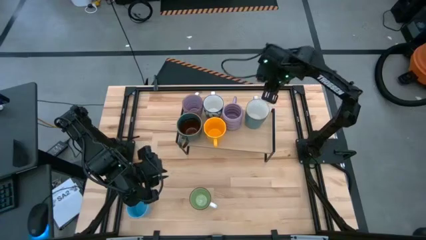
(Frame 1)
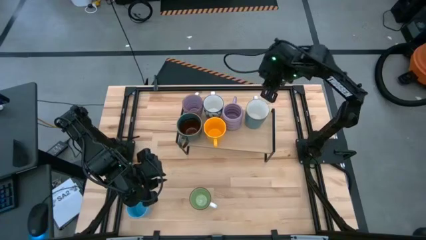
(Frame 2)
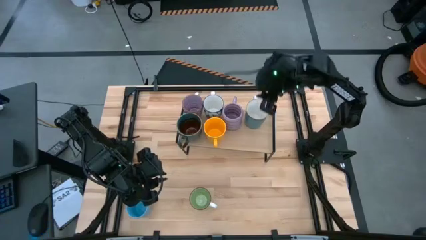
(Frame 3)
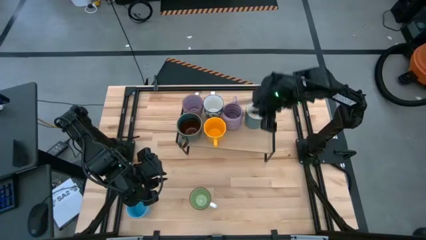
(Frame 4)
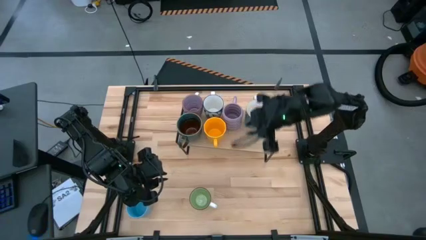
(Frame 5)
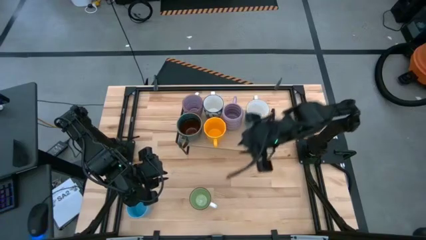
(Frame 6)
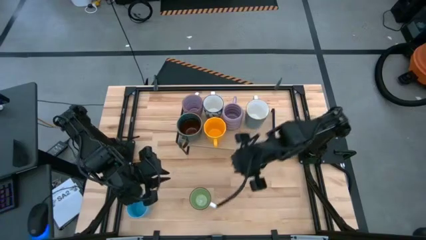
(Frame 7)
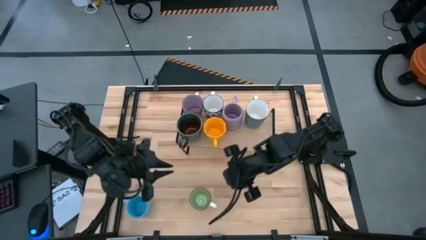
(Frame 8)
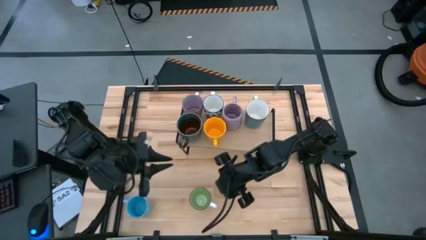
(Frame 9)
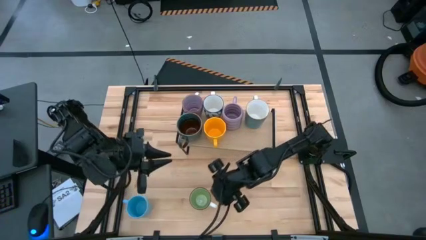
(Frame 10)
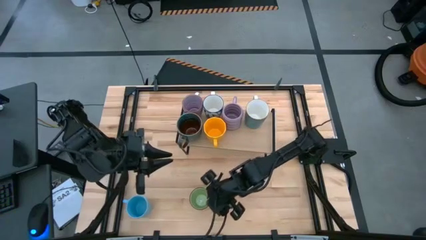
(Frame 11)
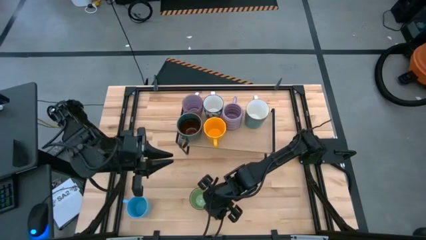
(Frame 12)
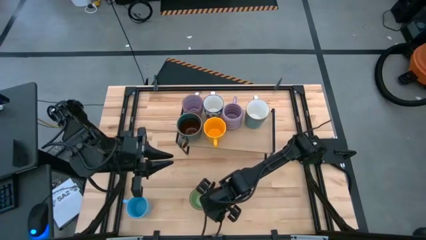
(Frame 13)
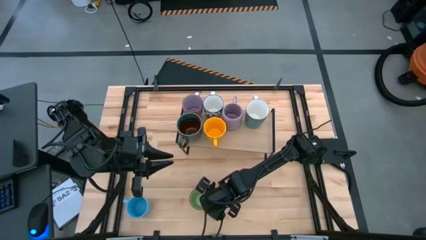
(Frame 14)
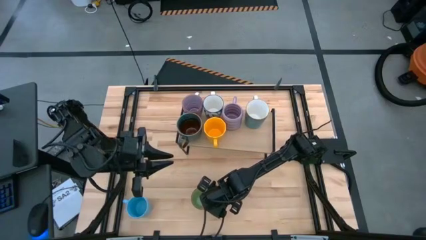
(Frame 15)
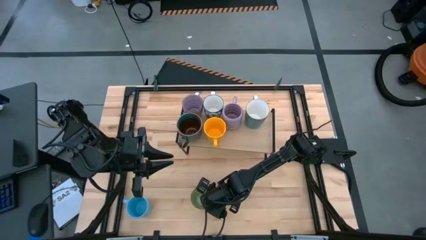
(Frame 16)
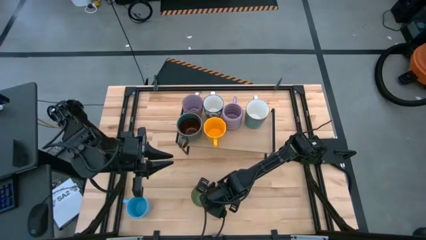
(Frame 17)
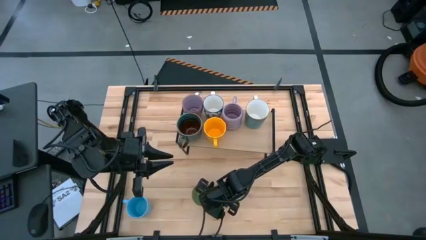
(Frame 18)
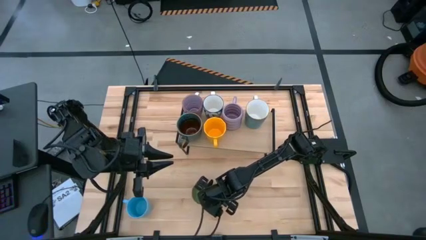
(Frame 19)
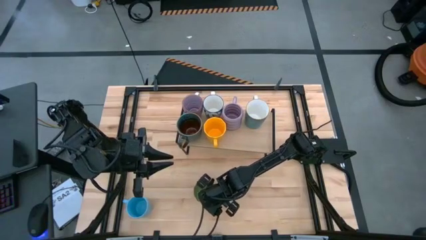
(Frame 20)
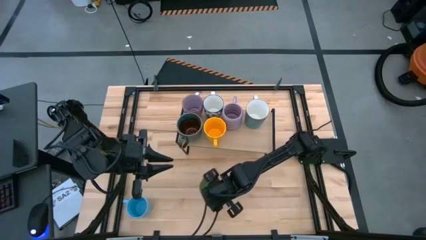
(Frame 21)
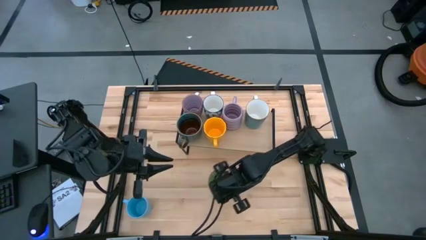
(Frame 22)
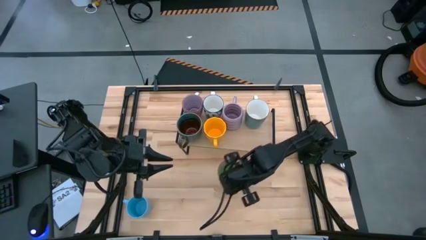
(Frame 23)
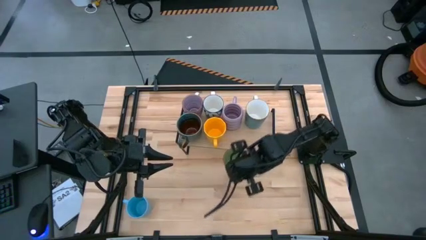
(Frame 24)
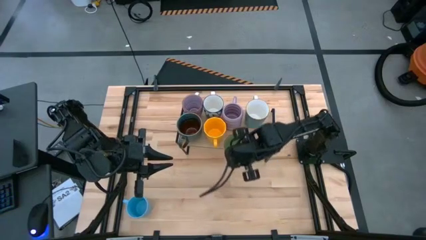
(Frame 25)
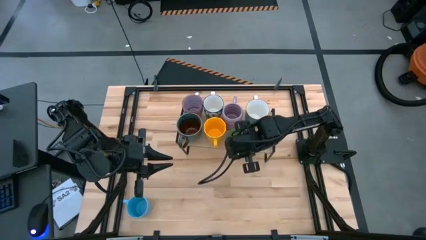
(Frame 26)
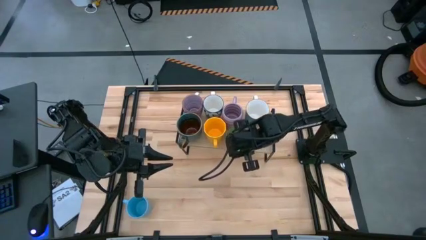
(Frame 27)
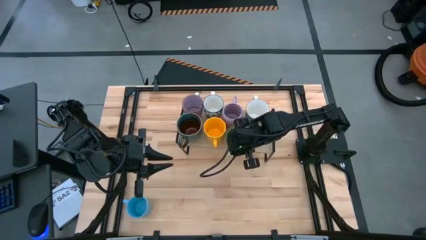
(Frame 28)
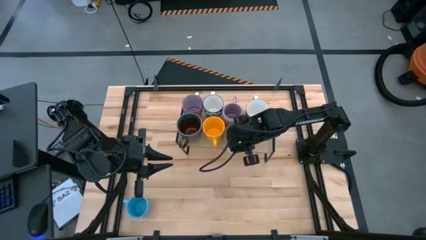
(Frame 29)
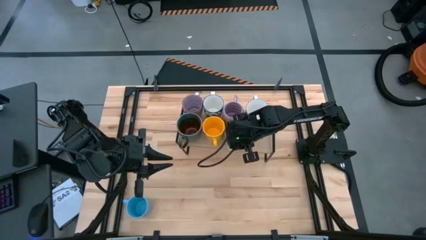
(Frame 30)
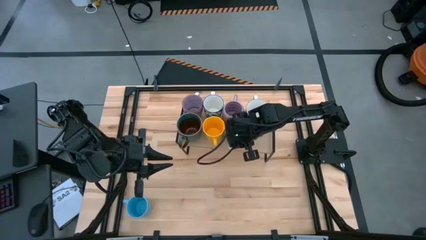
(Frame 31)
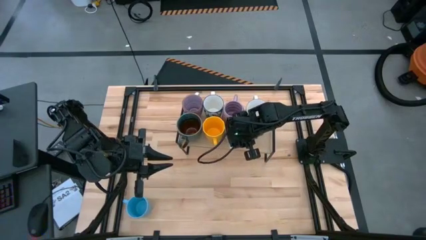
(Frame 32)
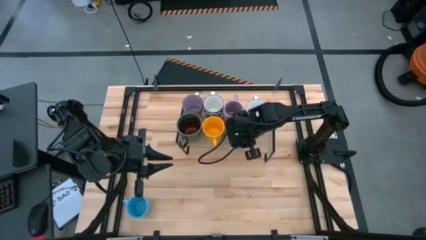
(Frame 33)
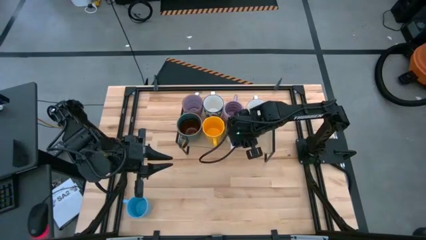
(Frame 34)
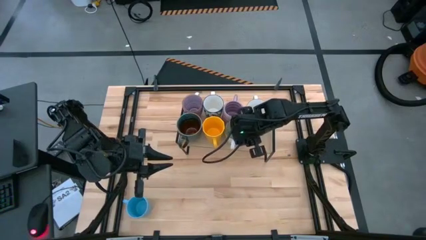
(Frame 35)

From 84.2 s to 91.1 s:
Task: Place coffee mugs
Put the green mug on the shelf

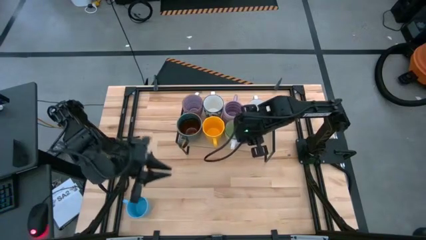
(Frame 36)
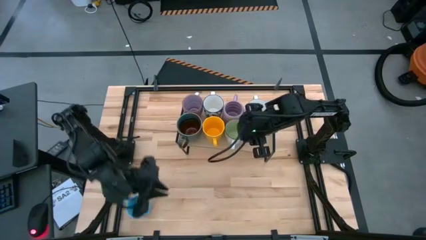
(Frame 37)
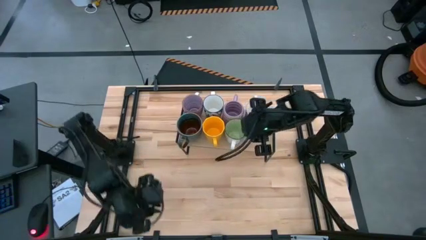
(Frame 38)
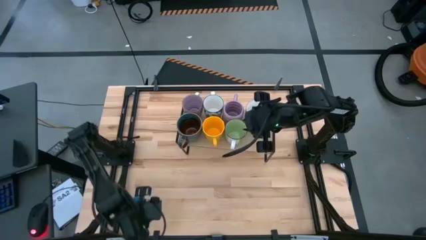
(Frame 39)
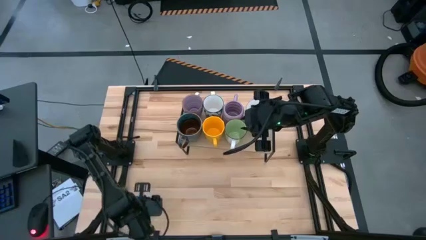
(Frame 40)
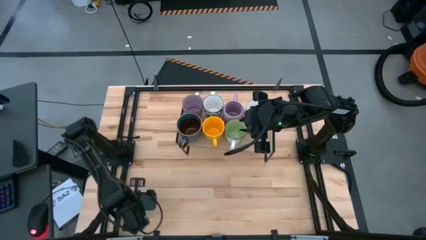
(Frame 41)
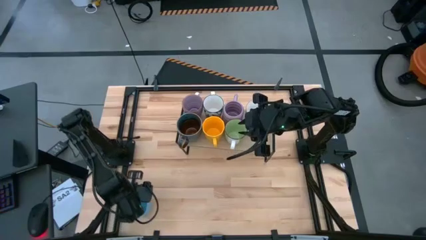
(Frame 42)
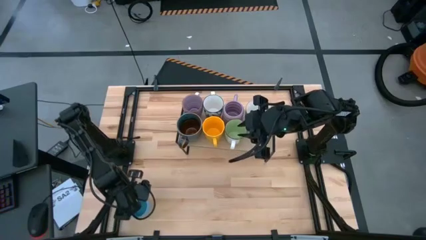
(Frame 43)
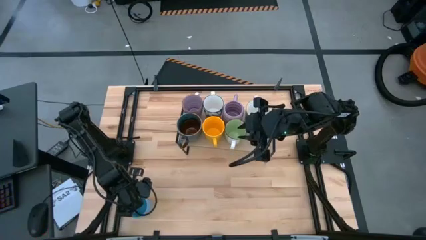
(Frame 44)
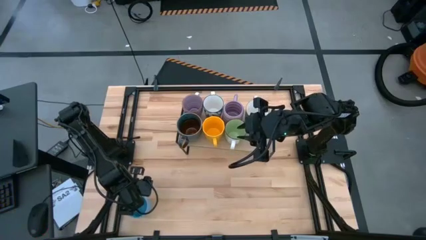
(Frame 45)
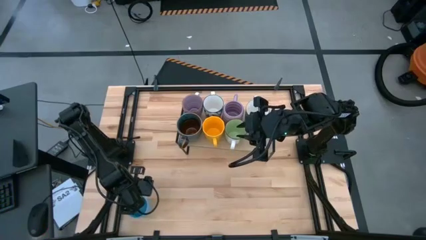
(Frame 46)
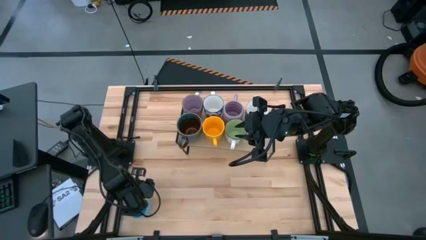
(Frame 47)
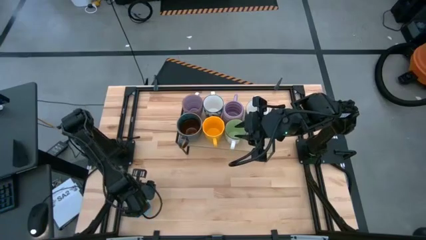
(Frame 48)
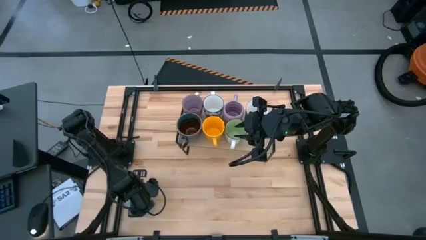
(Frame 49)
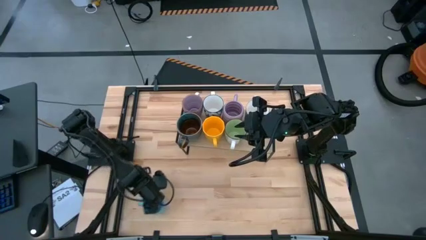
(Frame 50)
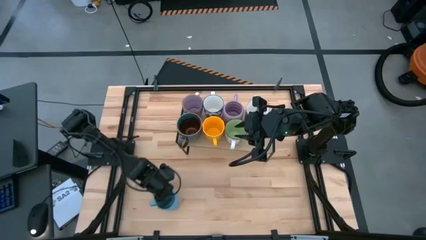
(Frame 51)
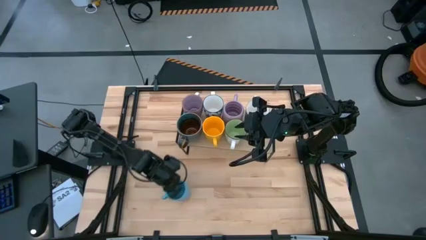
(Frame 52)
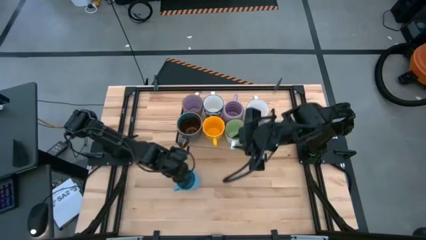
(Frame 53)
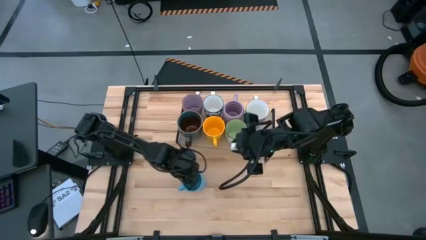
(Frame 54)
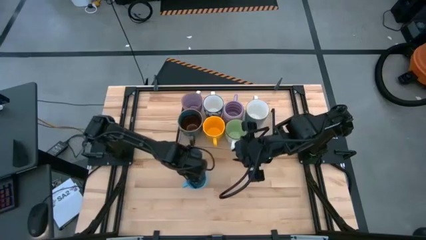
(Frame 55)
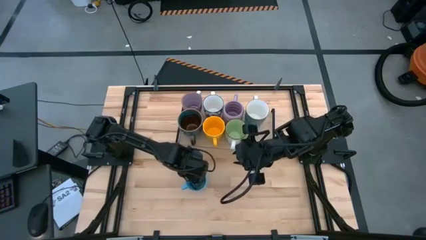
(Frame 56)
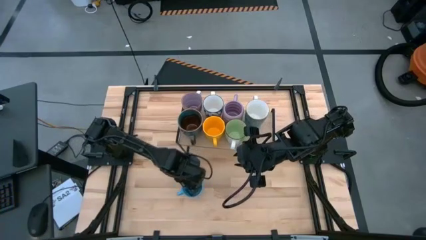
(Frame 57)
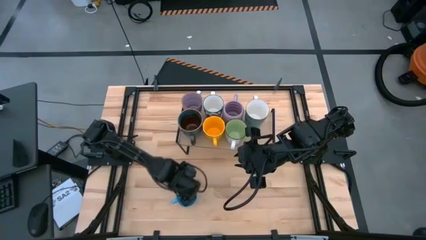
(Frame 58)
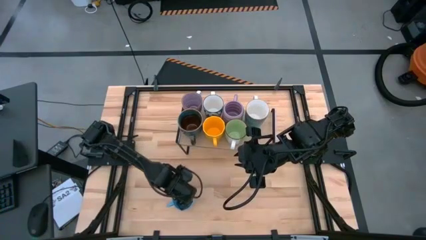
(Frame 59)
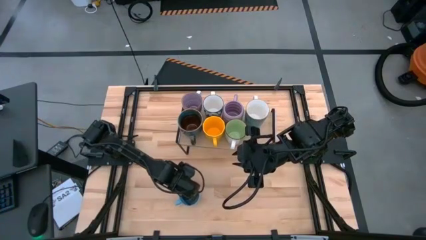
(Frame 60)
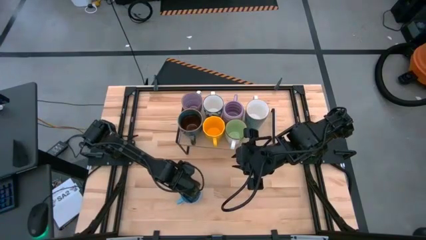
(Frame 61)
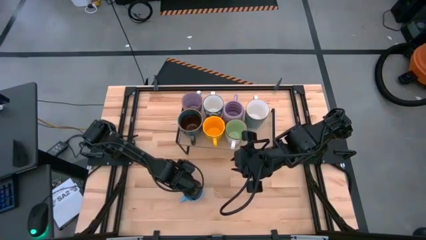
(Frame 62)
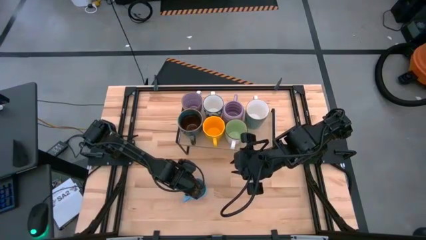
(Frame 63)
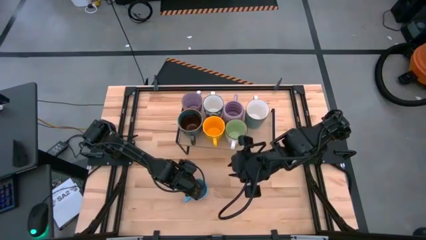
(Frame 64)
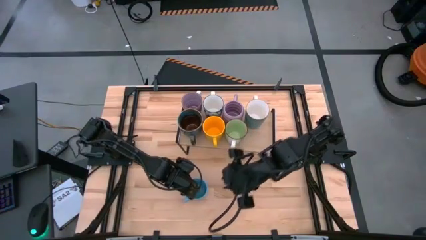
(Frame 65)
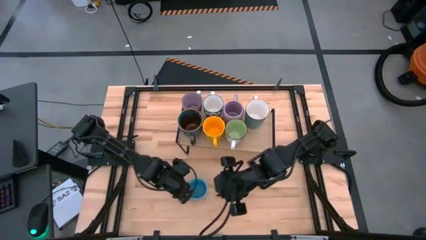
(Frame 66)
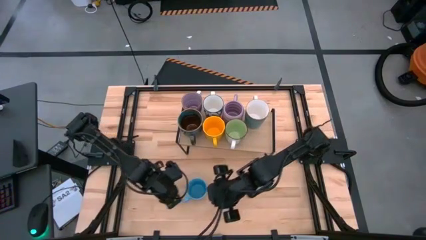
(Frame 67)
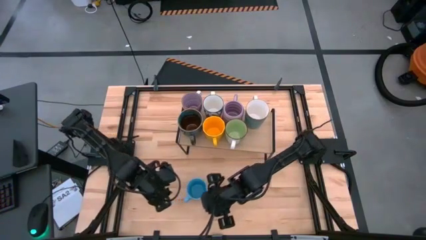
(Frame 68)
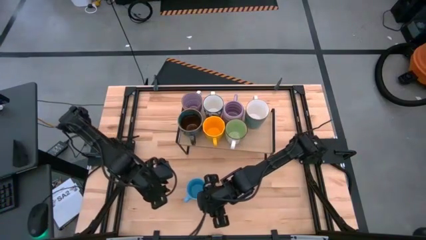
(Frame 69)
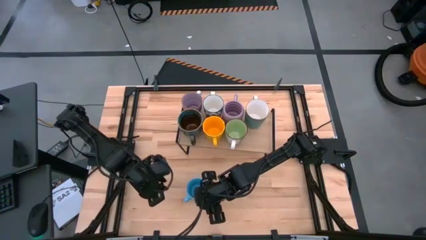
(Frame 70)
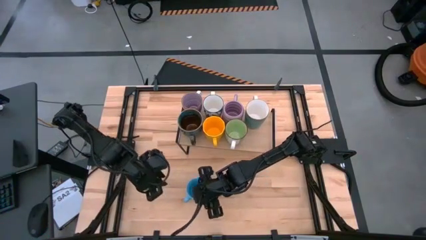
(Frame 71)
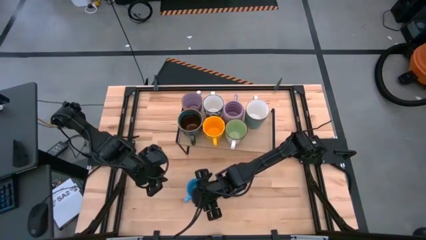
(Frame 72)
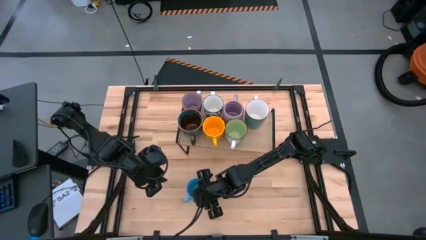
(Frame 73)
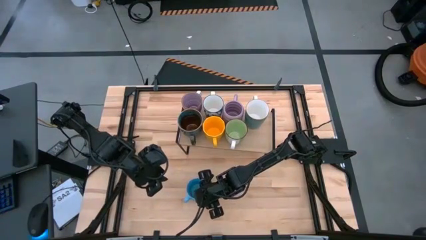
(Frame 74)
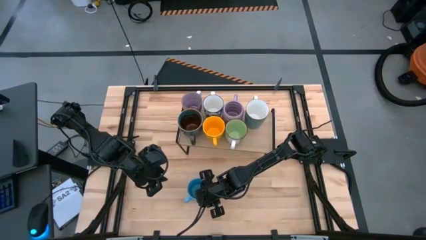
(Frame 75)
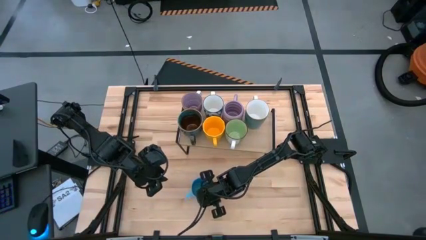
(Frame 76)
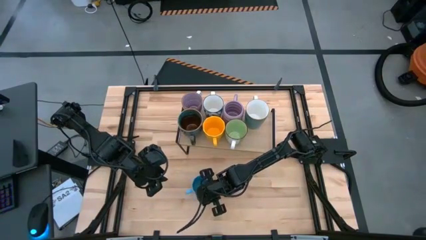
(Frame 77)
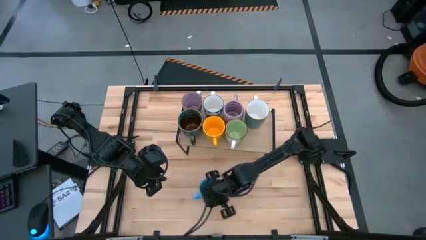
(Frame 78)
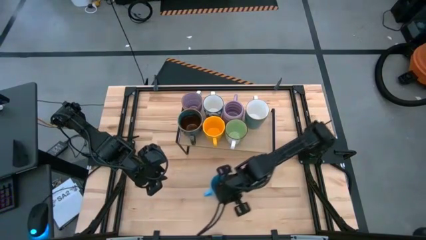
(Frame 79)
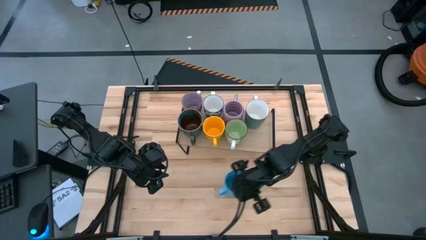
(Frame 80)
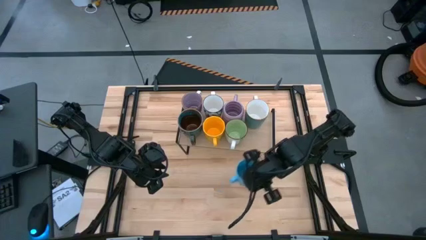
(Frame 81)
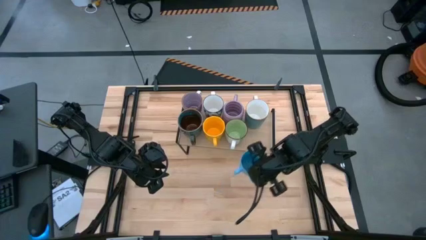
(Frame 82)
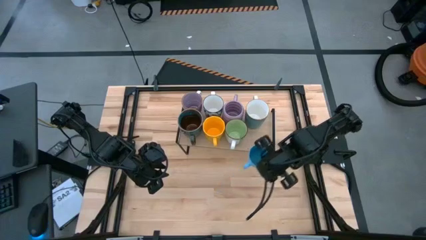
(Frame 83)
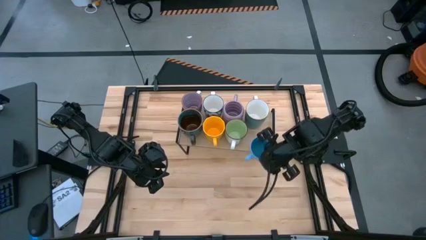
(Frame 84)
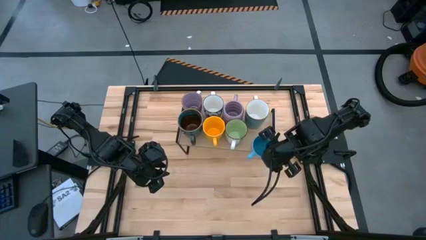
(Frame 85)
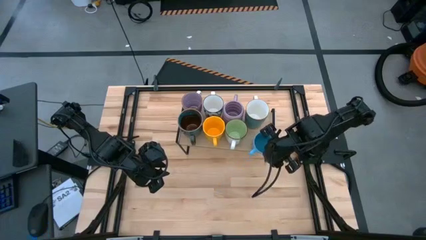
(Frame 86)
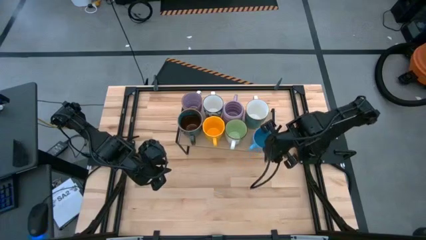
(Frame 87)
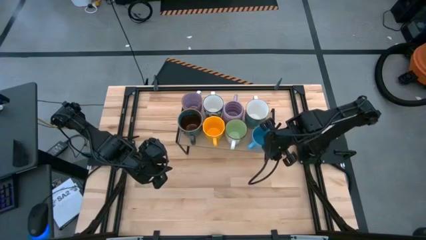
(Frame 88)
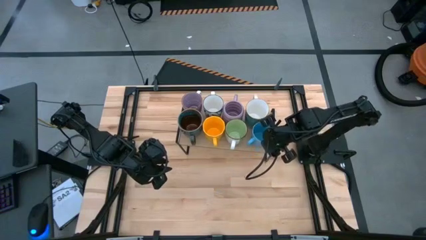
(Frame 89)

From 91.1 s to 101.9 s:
Put the light blue mug on the shelf
